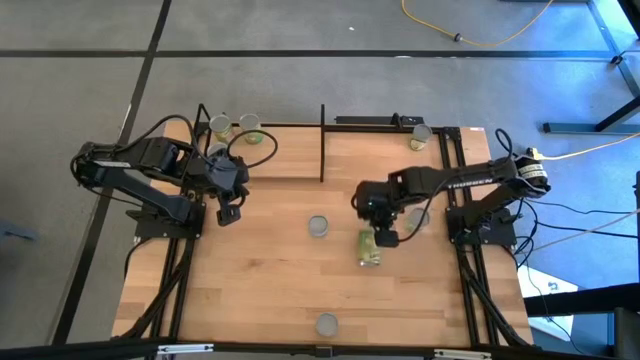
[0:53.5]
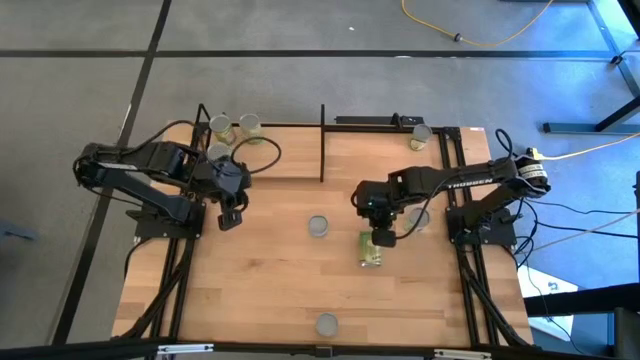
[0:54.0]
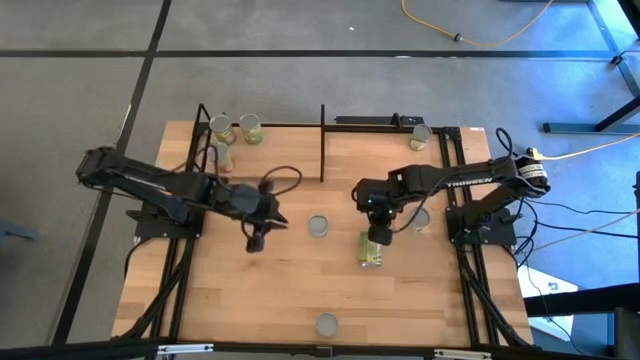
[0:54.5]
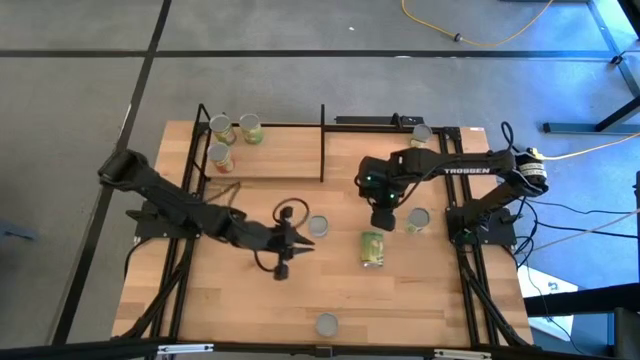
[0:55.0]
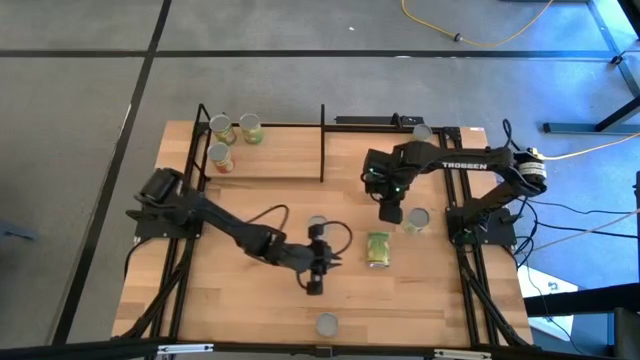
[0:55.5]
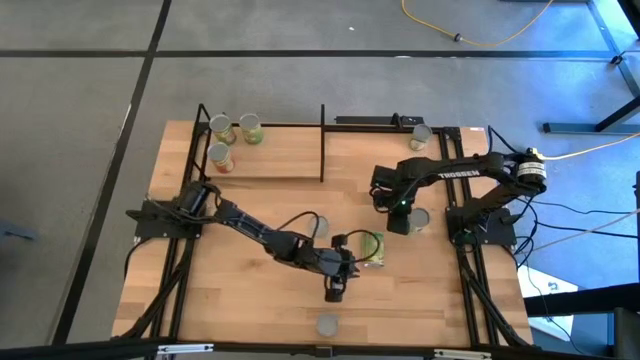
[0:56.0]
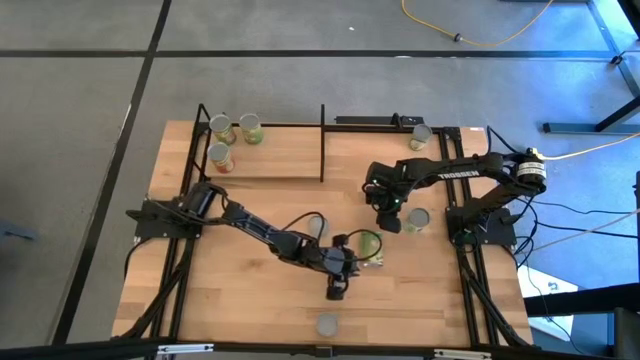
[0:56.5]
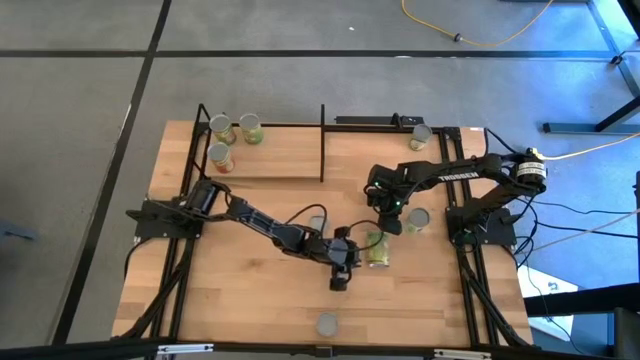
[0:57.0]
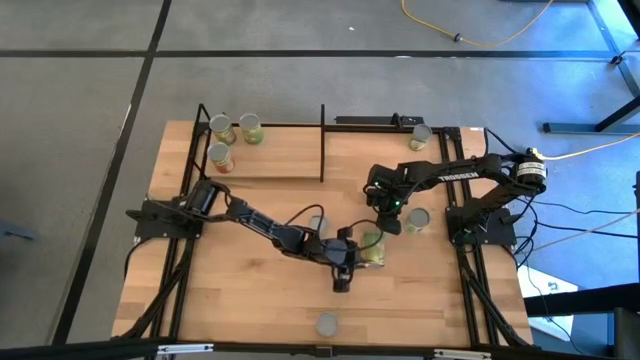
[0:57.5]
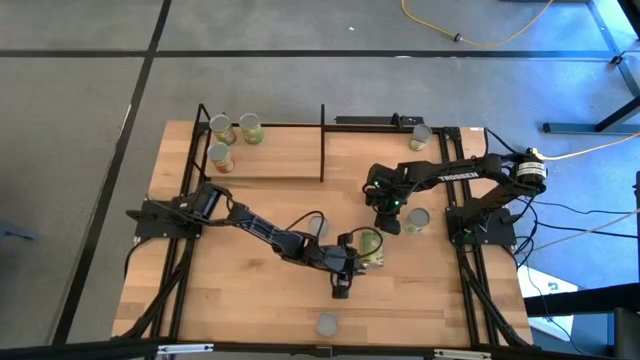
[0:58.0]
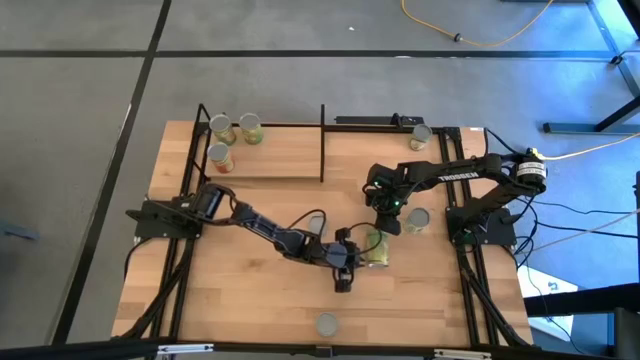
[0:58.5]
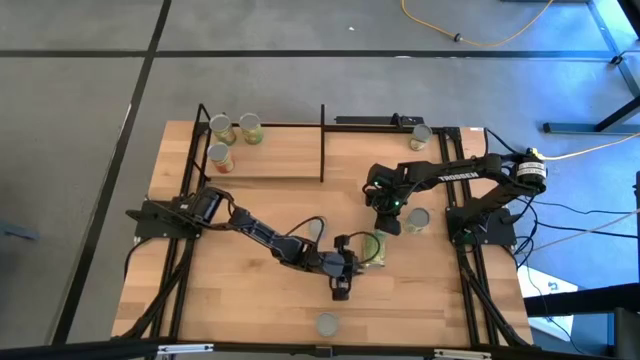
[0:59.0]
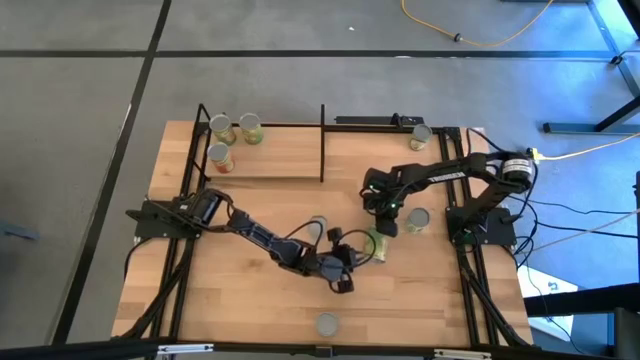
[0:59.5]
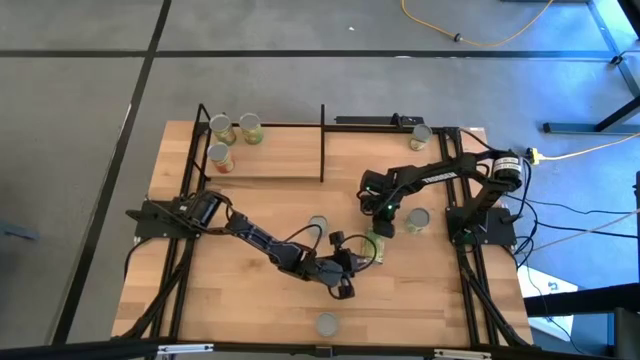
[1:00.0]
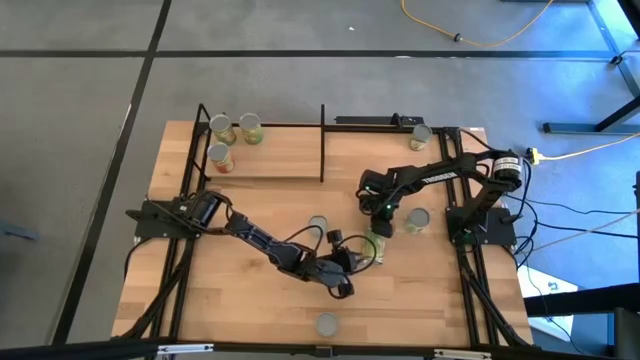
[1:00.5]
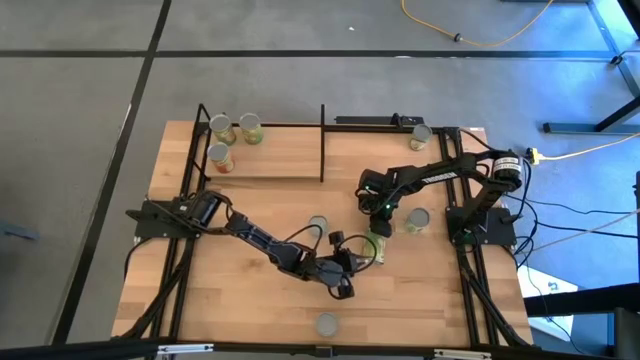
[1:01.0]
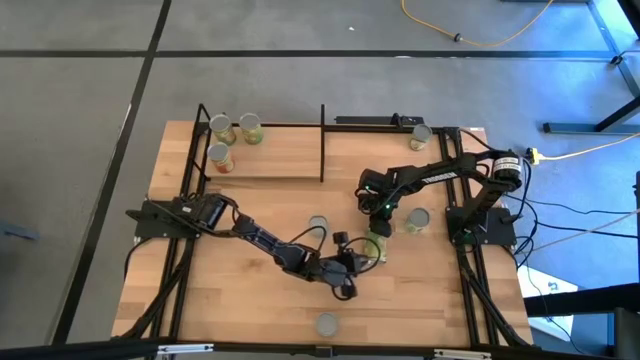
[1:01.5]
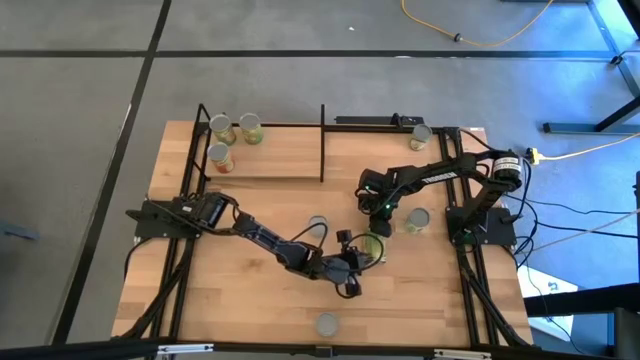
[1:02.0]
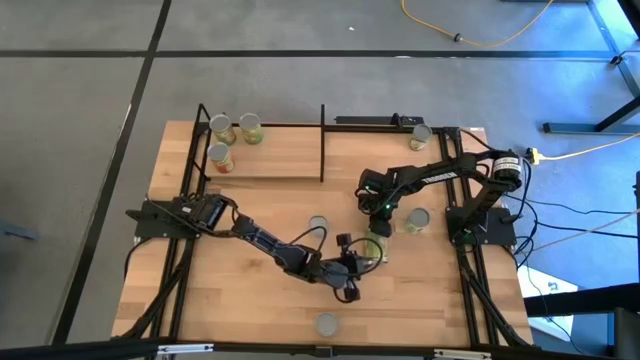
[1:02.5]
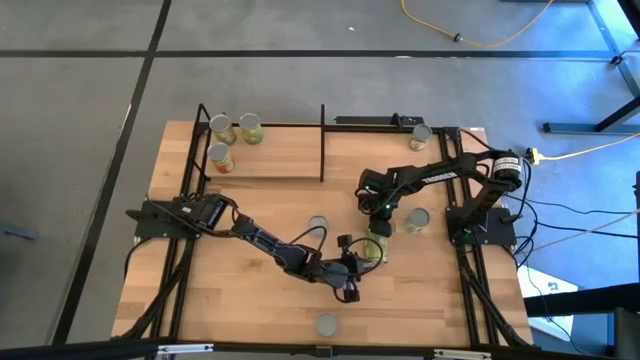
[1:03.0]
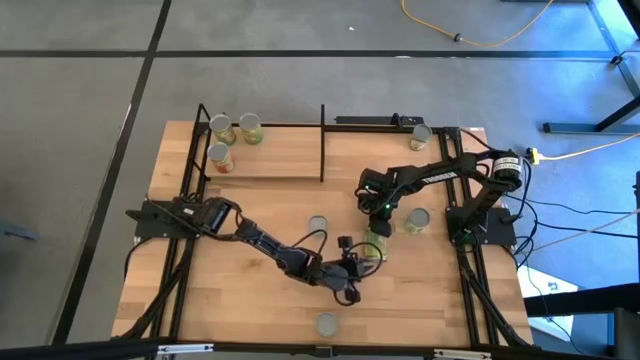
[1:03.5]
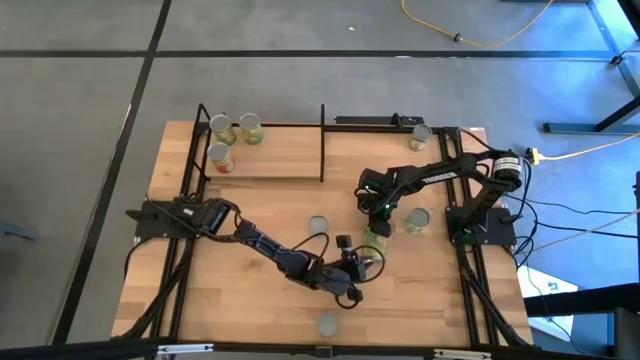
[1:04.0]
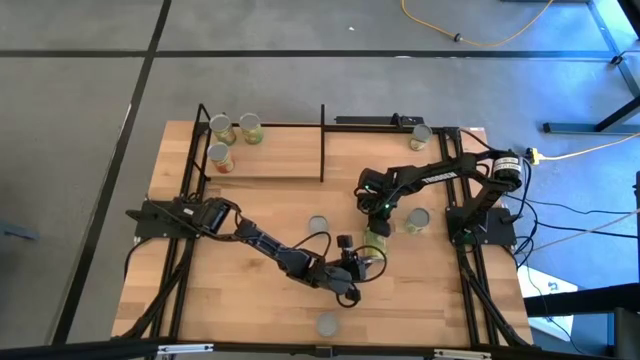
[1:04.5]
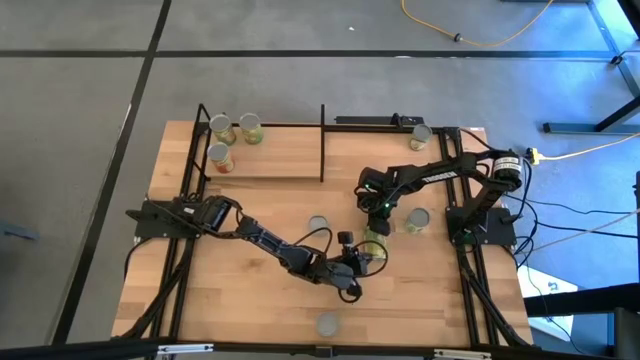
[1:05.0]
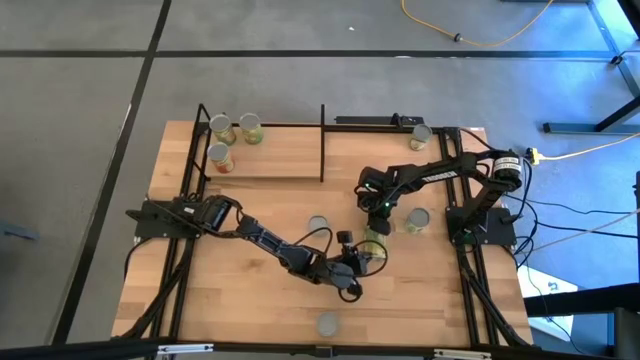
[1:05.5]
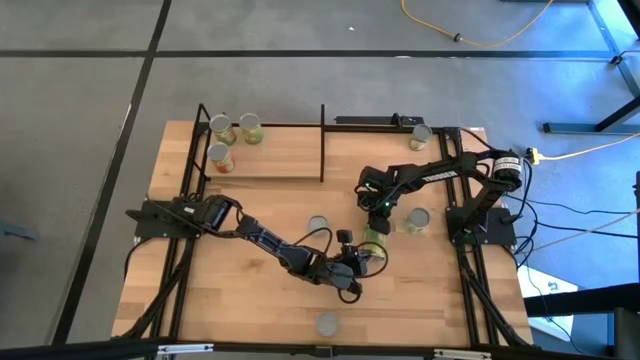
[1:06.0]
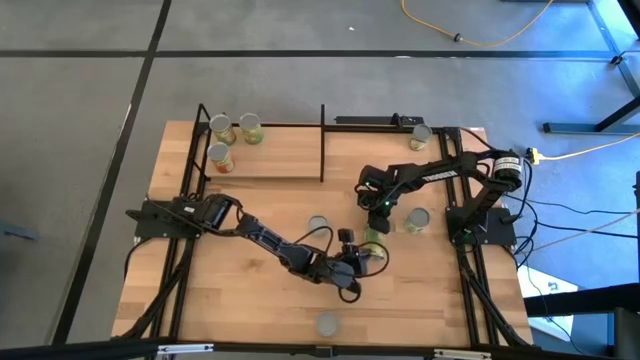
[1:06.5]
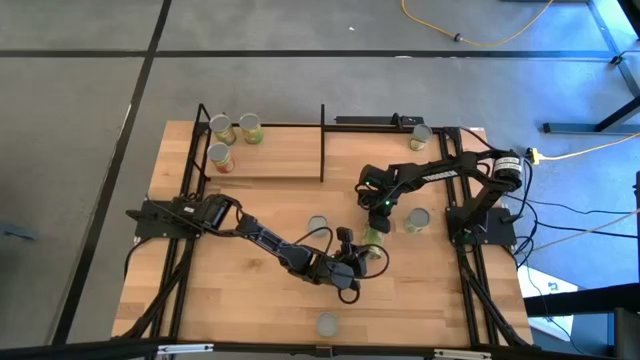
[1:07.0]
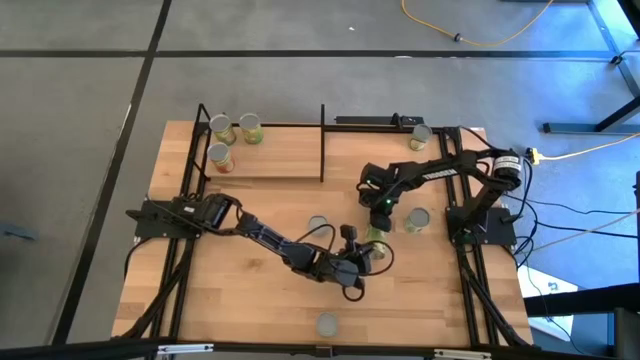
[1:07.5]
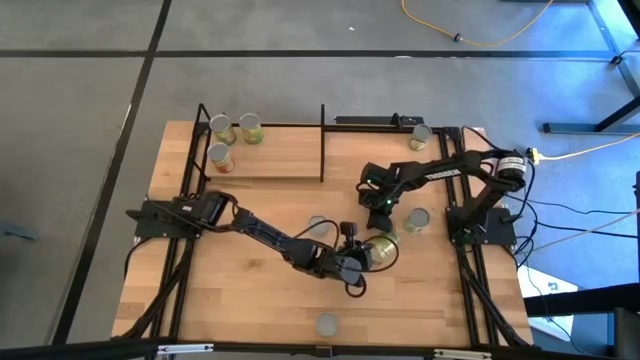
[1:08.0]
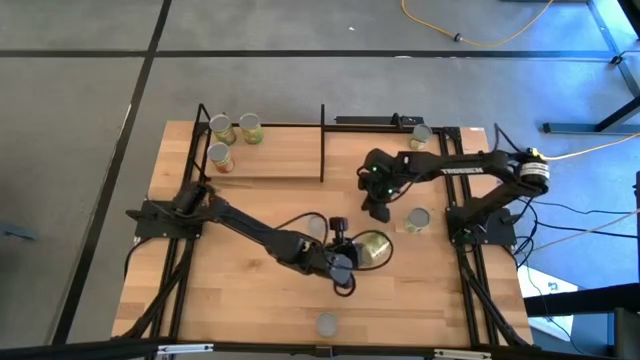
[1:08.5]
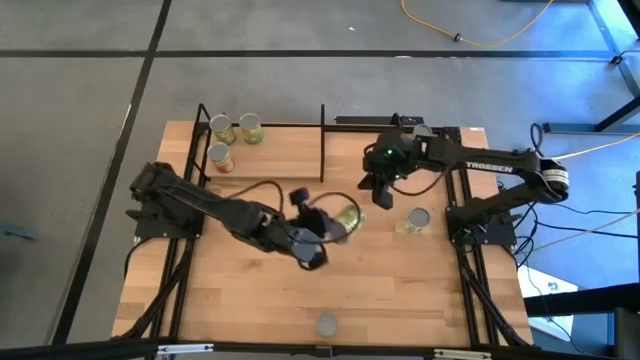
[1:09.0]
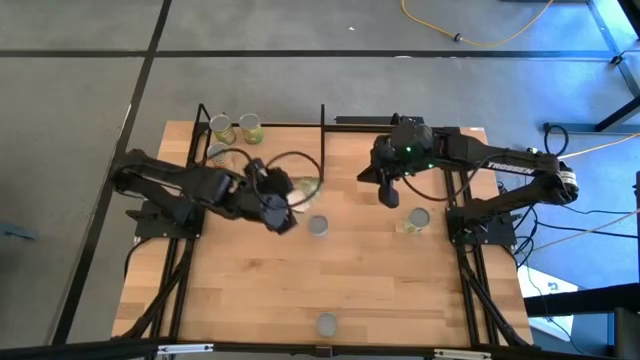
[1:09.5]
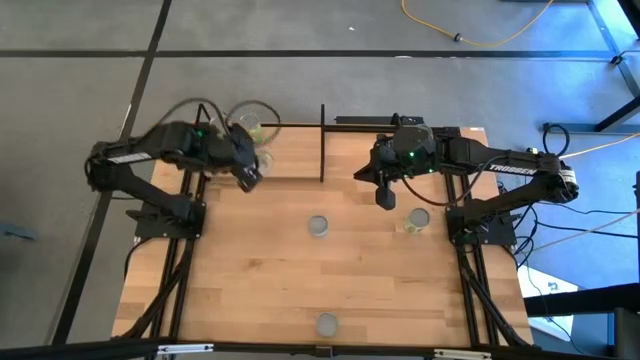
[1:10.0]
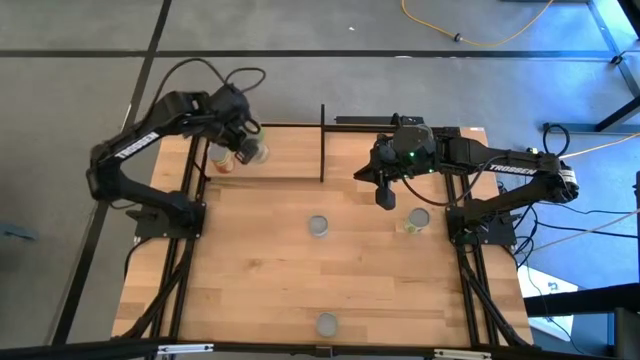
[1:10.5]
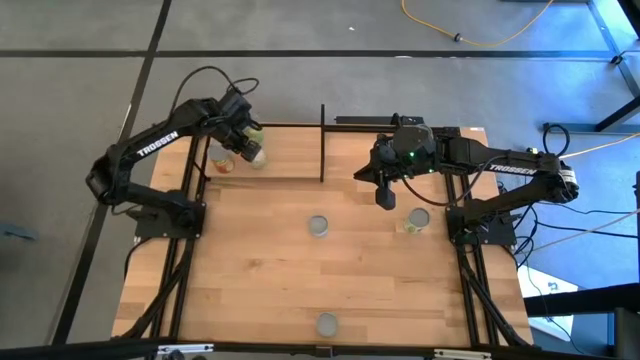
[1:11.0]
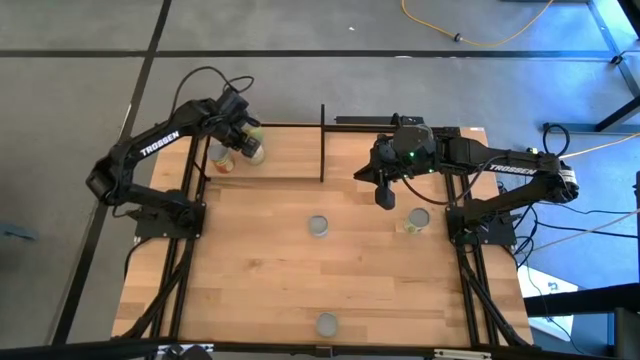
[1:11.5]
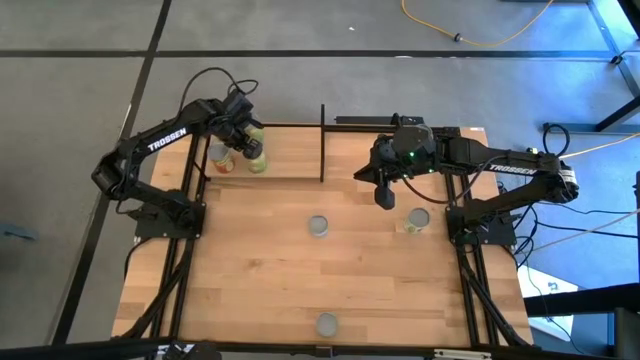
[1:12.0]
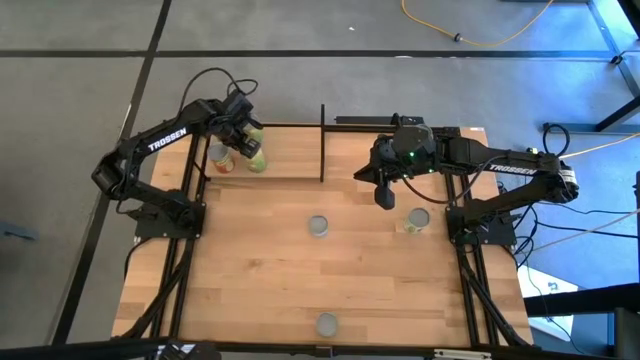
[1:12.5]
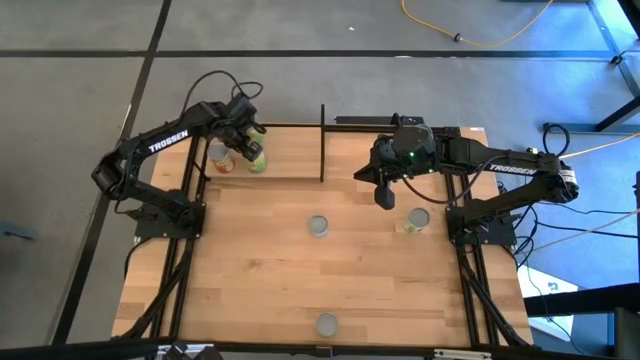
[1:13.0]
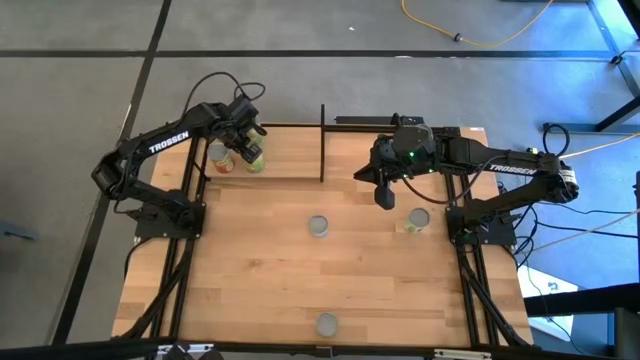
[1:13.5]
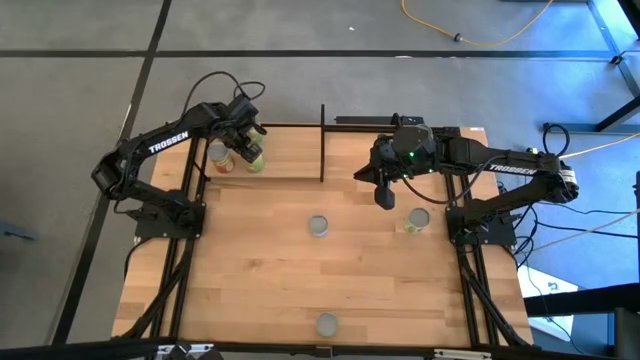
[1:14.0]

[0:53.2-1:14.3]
Task: Pick and place cans onto a shelf
Put the canned pears can on the shelf
